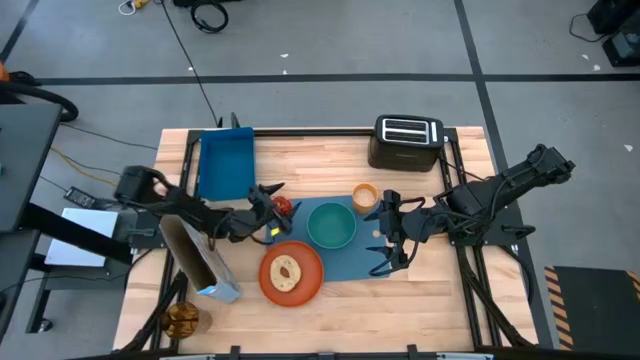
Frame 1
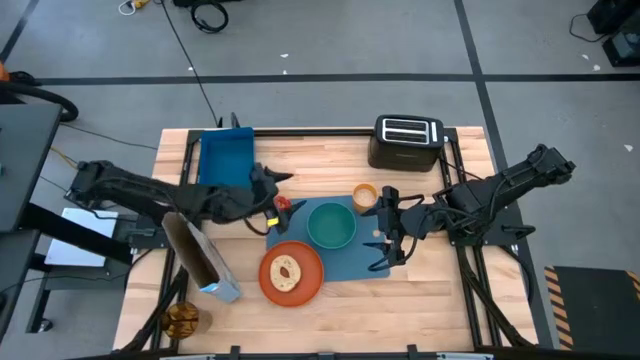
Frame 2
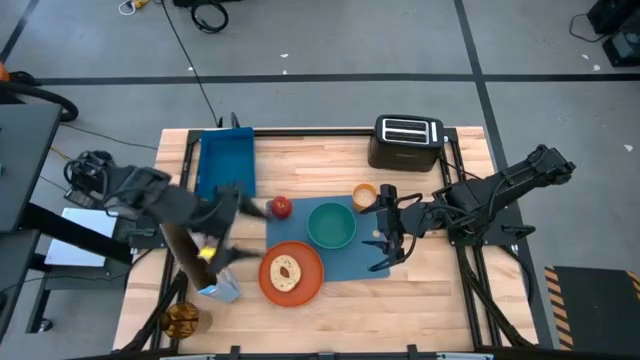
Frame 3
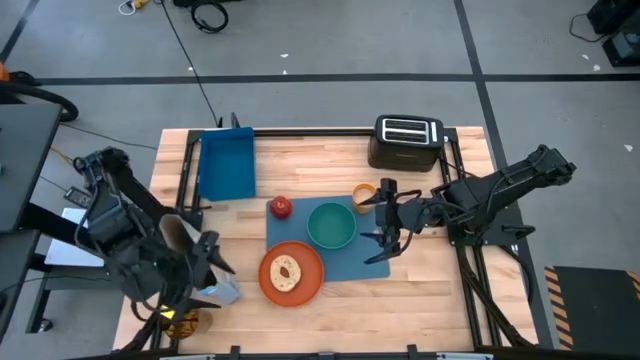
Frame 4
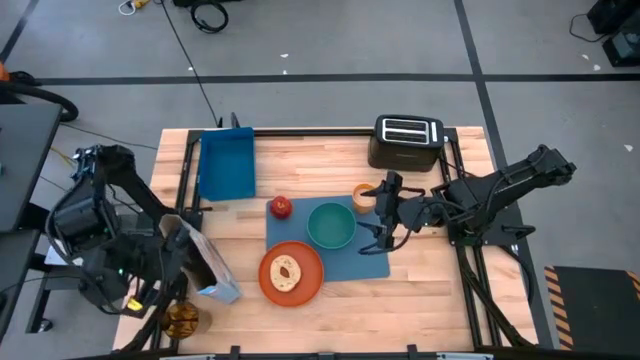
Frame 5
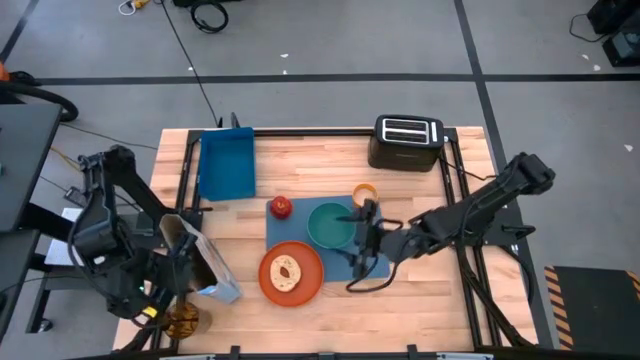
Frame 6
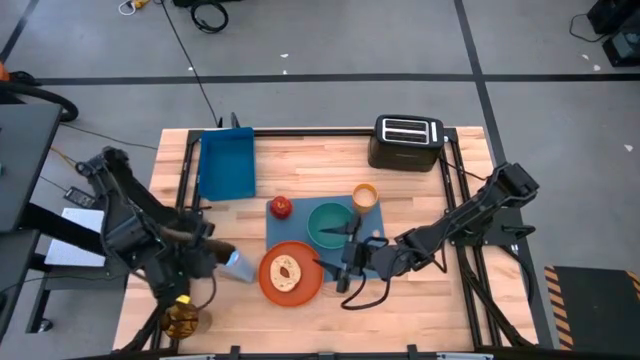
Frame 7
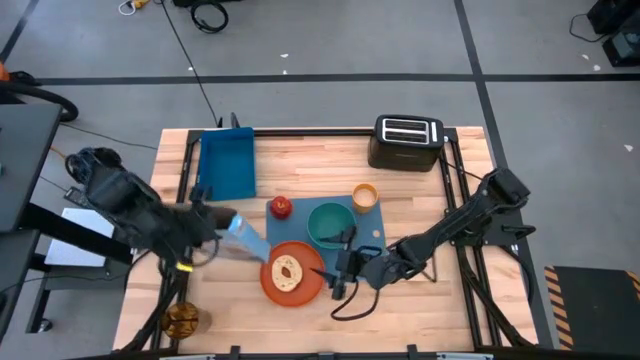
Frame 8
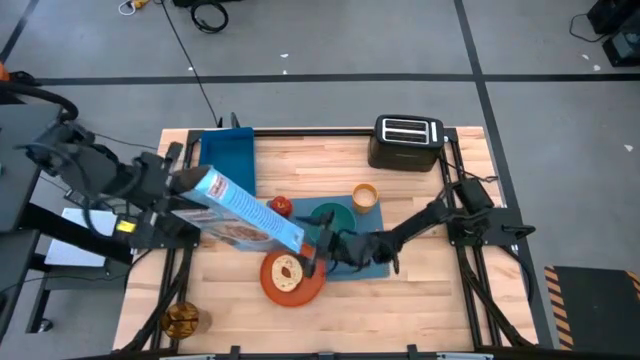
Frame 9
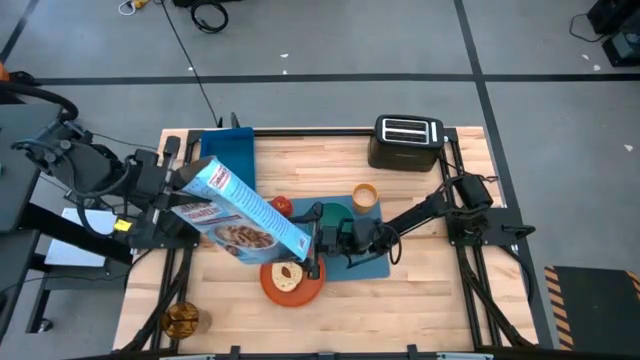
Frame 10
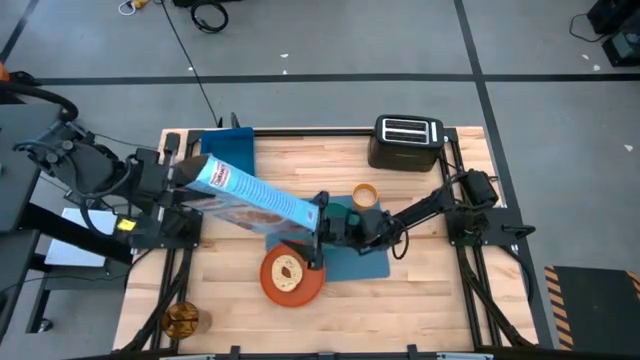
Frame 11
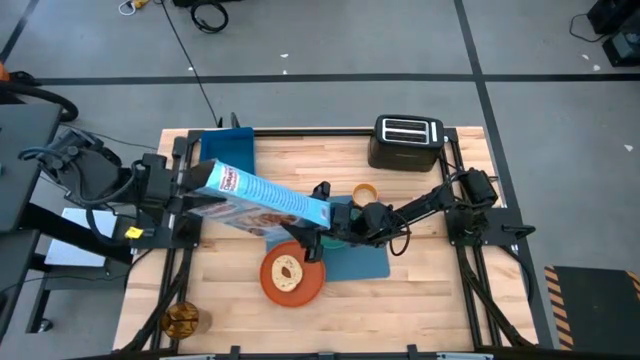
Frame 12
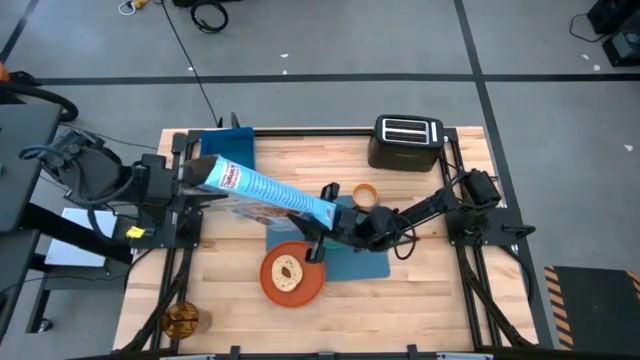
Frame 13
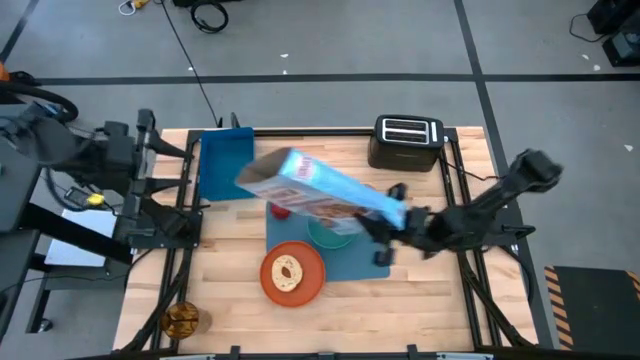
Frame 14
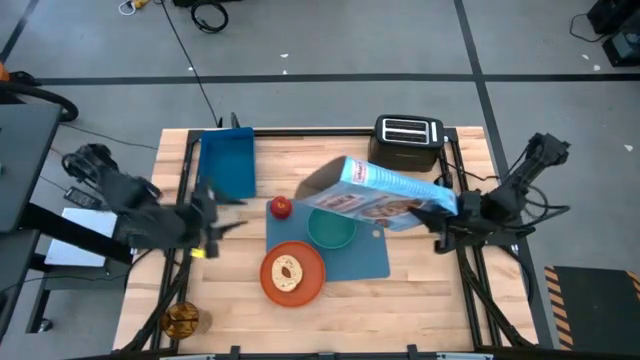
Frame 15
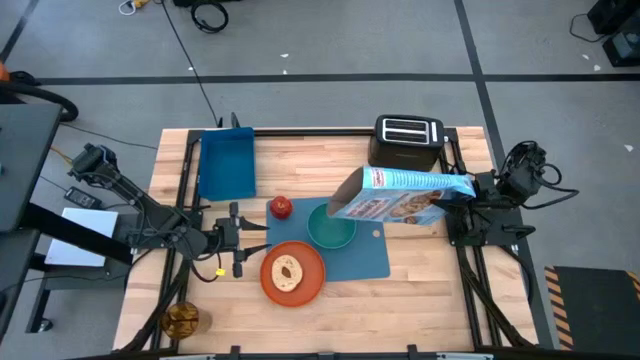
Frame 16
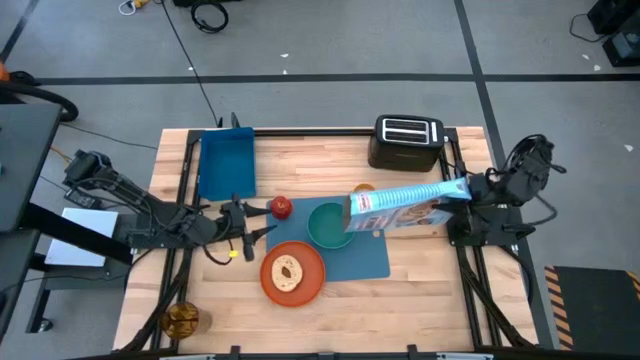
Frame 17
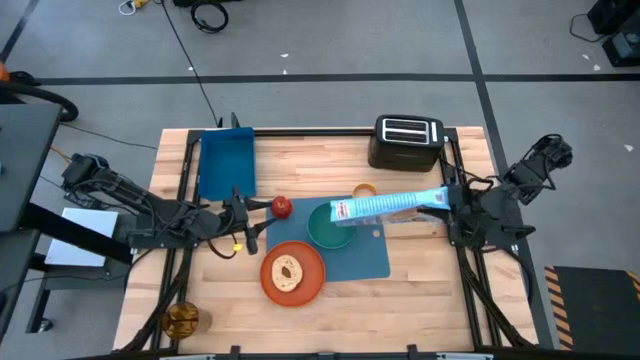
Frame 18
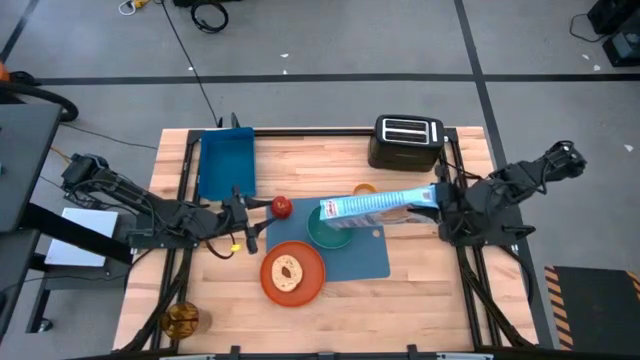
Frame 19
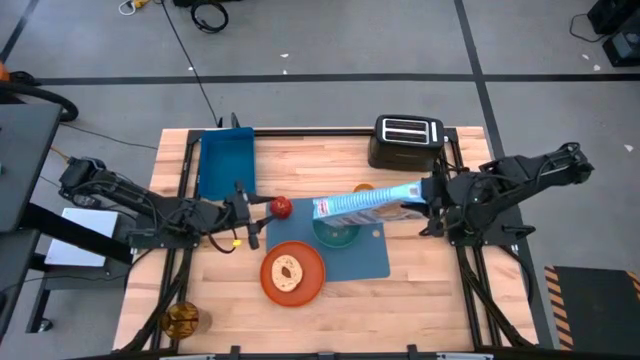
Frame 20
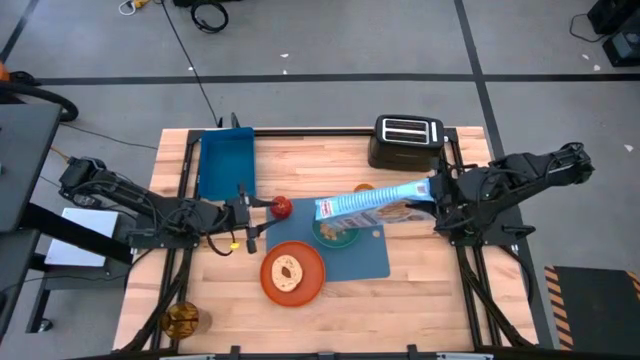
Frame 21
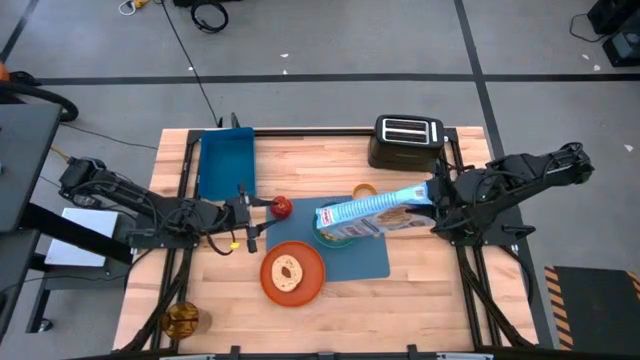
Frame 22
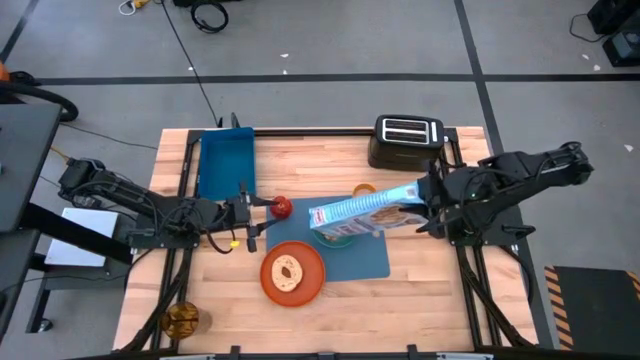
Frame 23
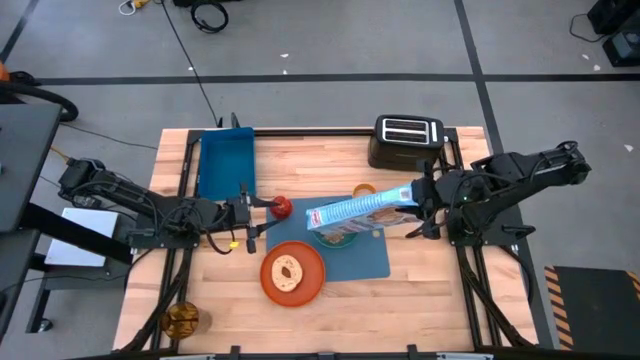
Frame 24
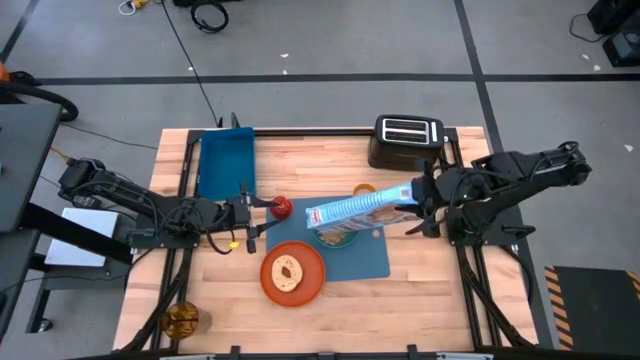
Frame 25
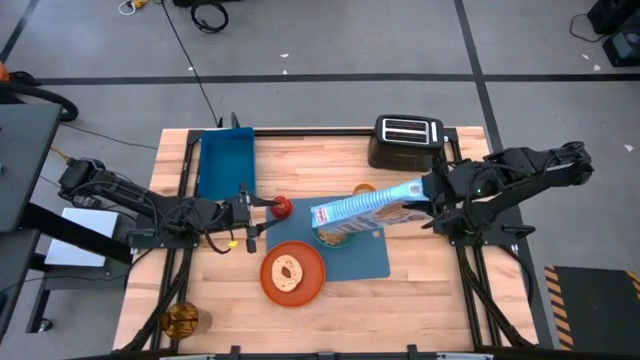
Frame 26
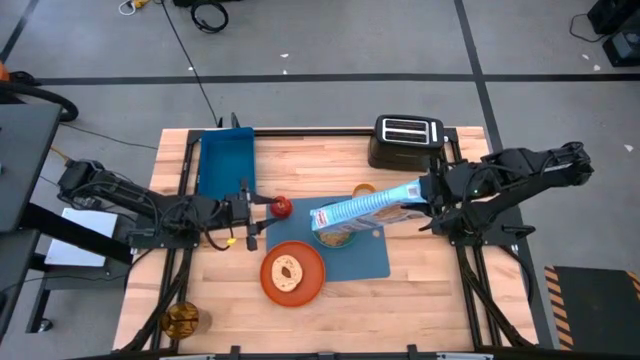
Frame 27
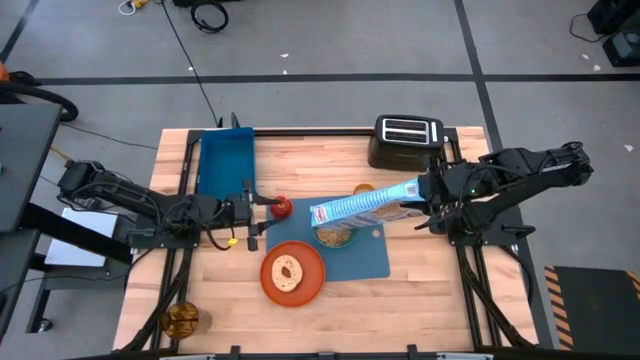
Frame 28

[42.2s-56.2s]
Task: Arrange a breakfast setting
Pour the cereals from the blue cereal box into the green bowl

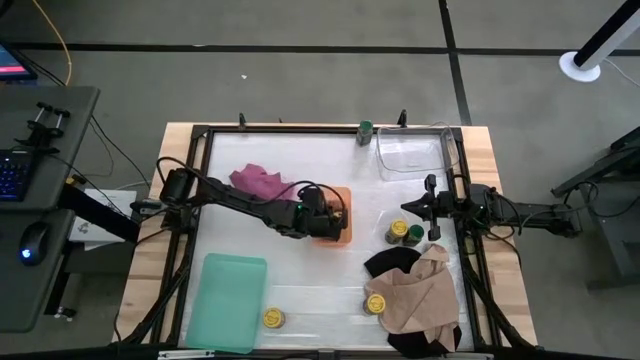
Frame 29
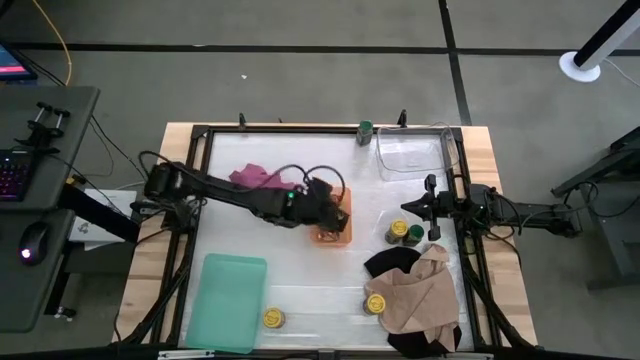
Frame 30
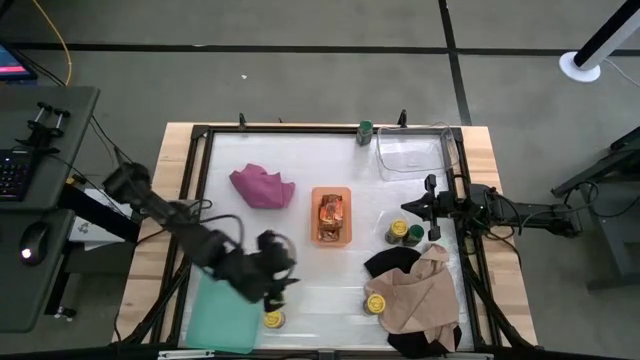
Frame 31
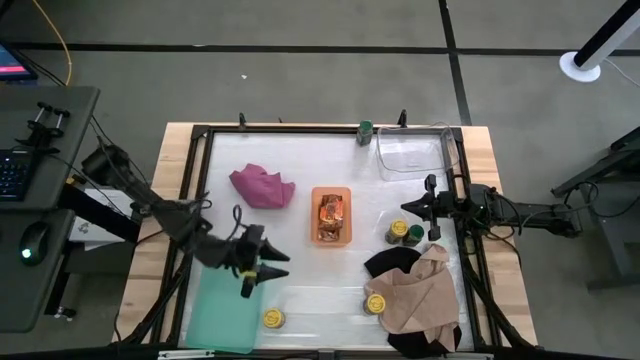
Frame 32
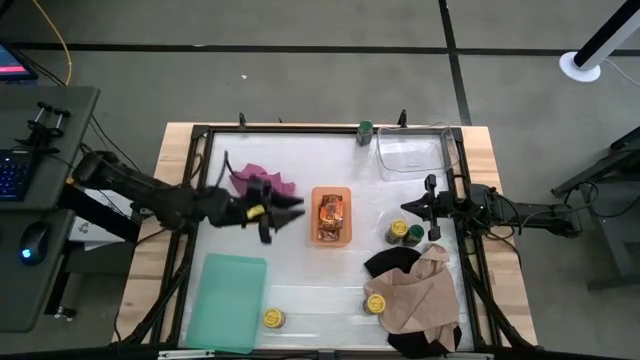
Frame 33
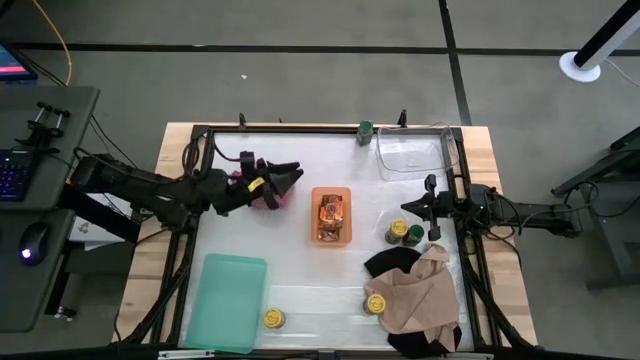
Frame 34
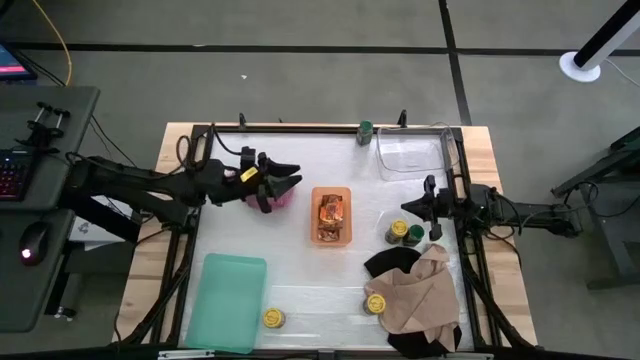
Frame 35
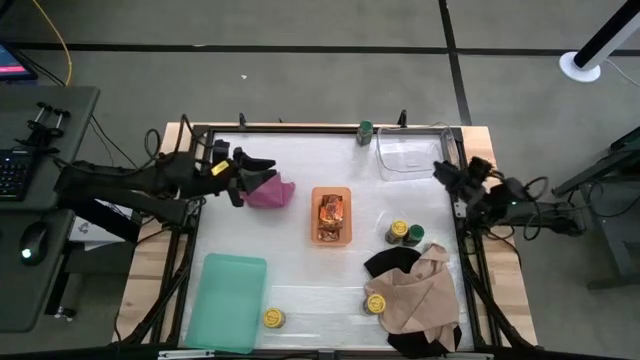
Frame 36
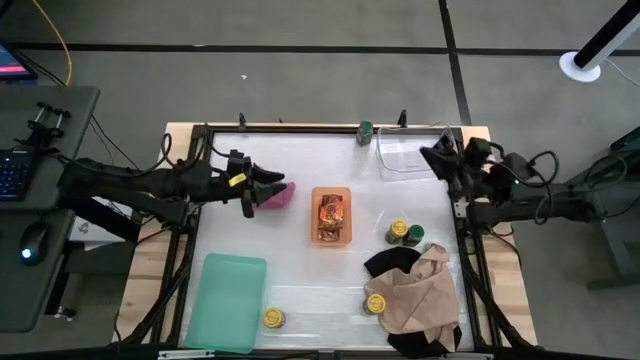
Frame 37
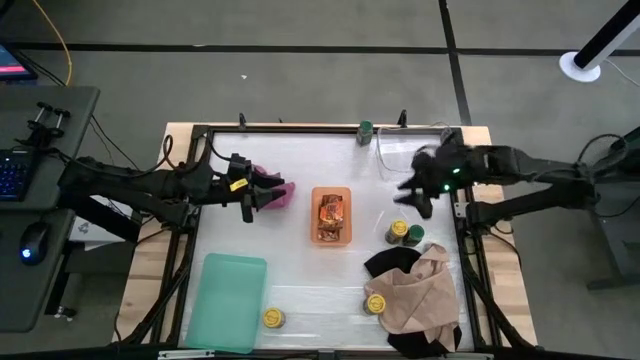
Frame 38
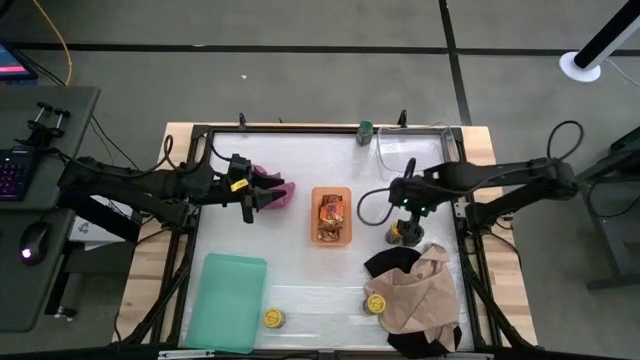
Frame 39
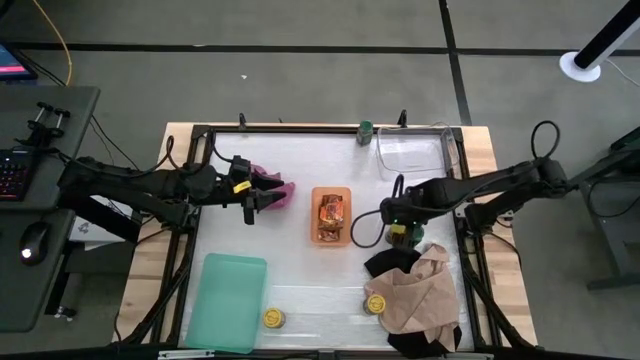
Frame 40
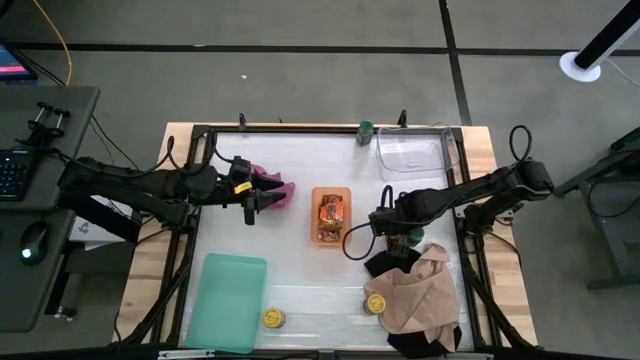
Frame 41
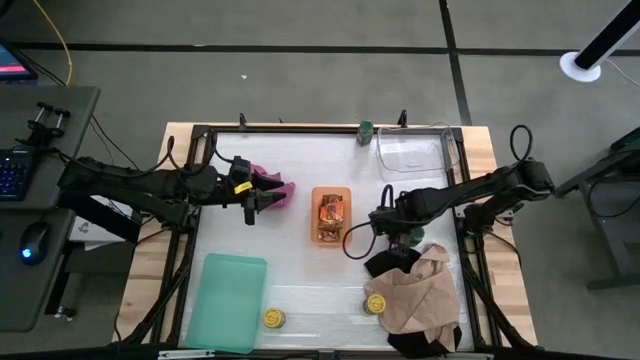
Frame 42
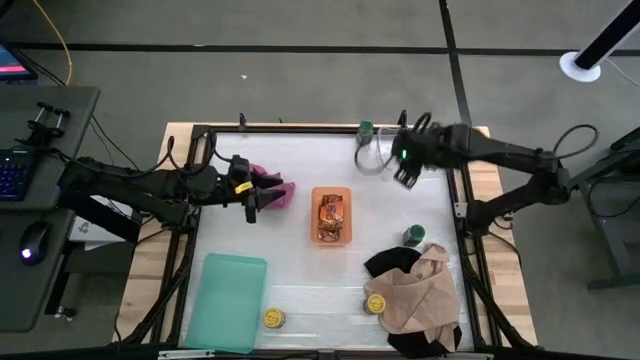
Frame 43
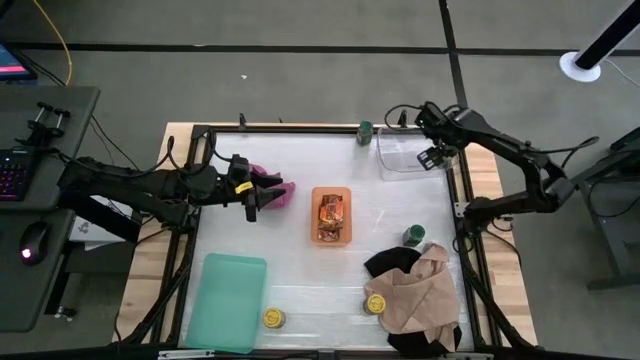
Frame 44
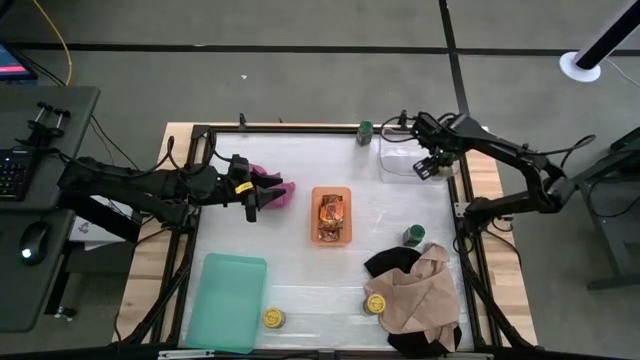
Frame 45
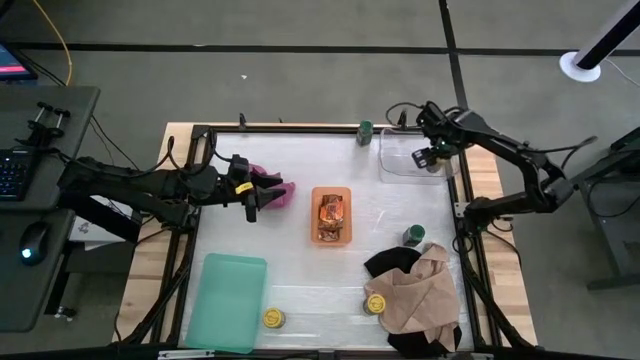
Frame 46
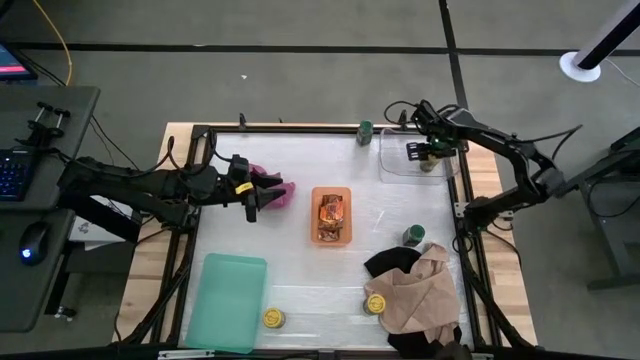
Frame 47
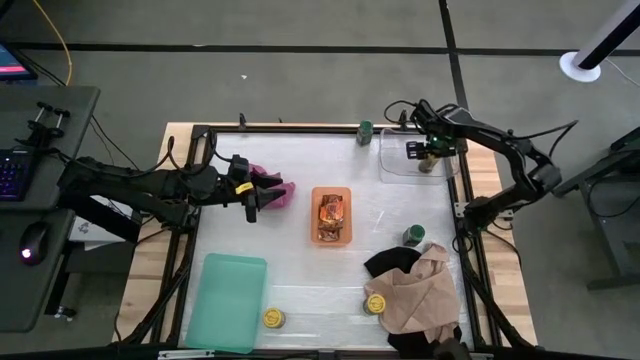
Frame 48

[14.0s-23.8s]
Task: Sort spices by type
Put the top right yellow seasoning bottle into the transparent bin
